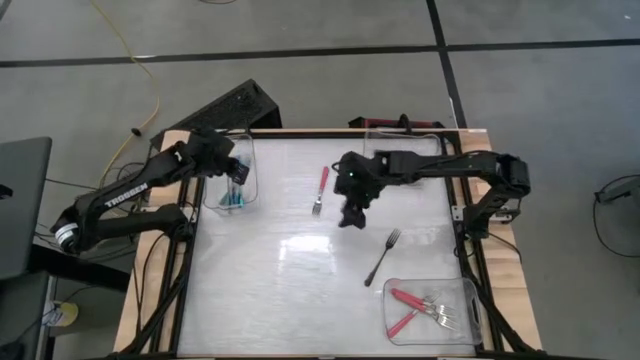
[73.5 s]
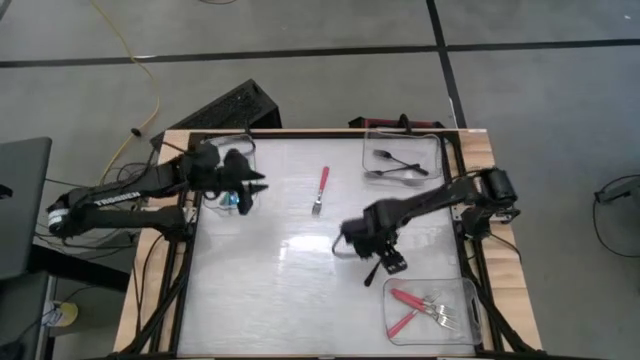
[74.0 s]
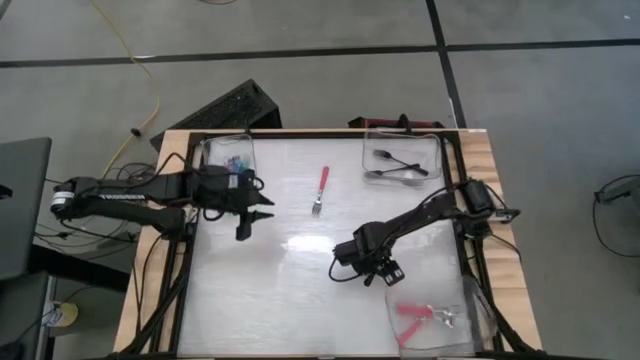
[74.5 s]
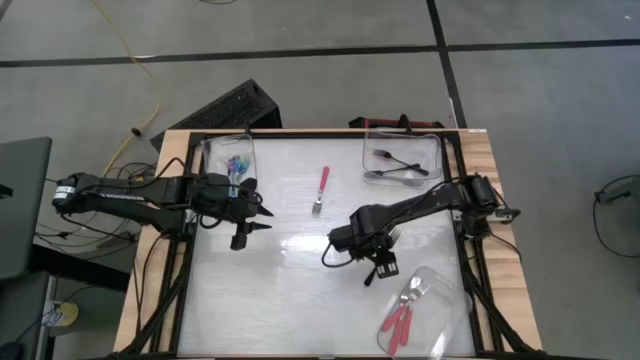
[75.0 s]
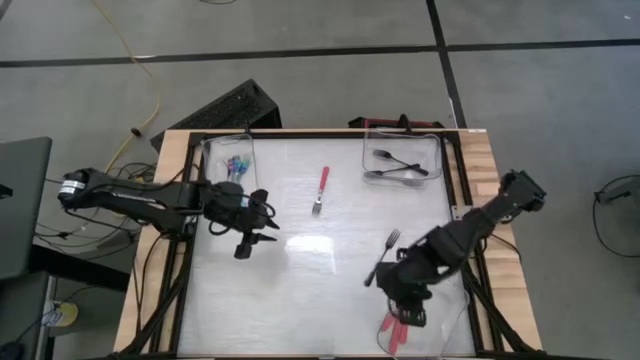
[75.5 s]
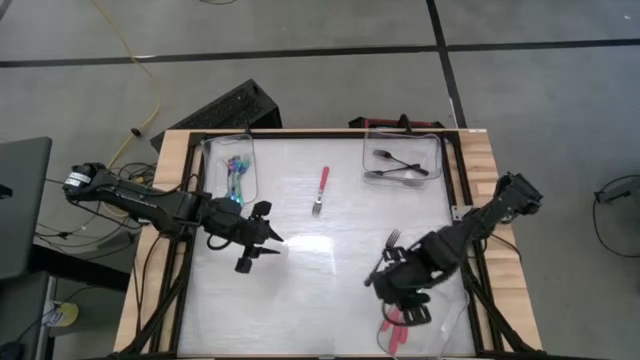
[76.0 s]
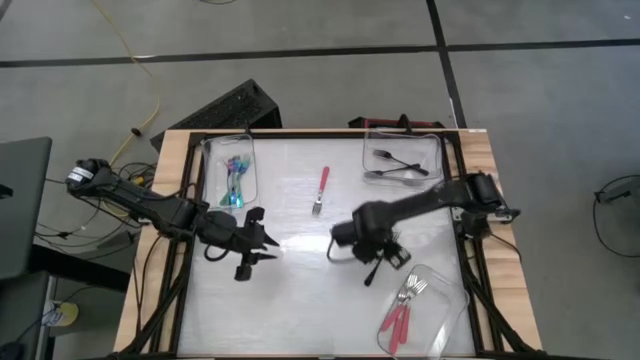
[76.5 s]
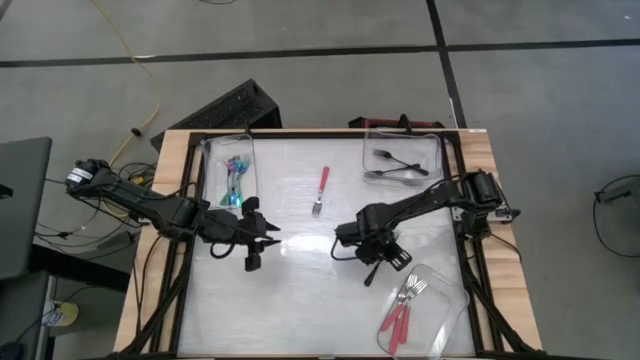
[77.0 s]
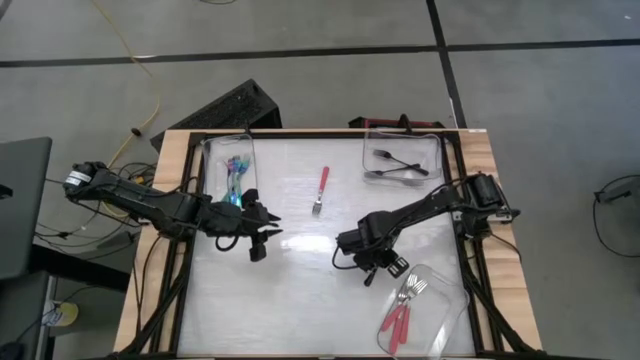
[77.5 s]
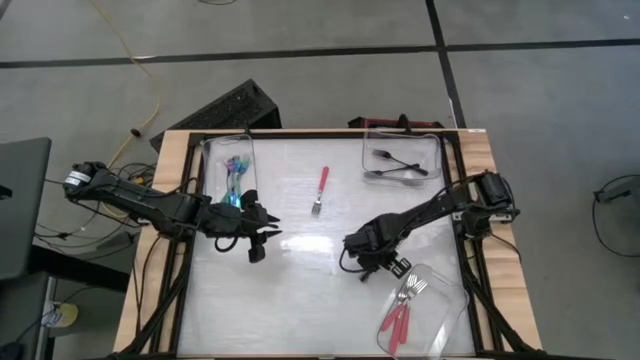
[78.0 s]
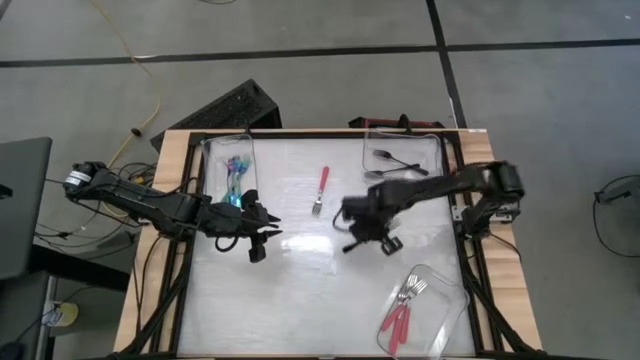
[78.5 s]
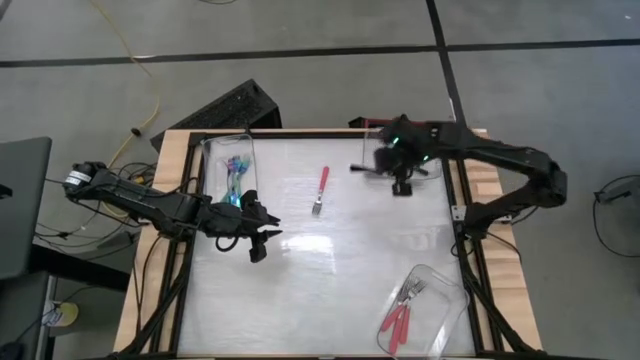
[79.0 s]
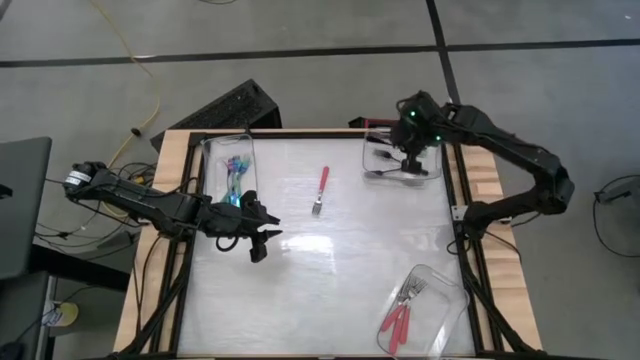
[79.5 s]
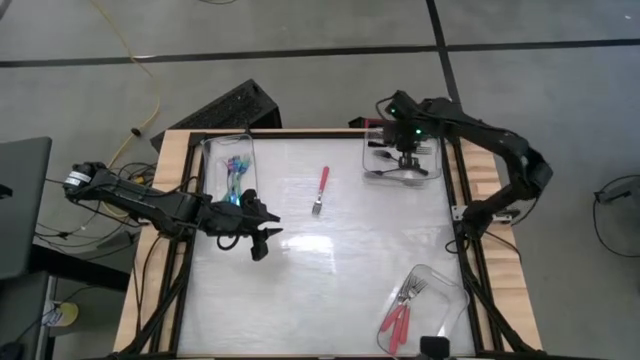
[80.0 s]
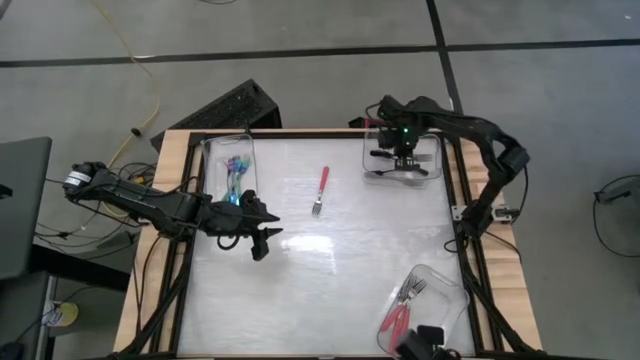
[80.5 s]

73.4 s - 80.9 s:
Task: Sort silverware by color (type)
Put the black fork into the top right transparent bin

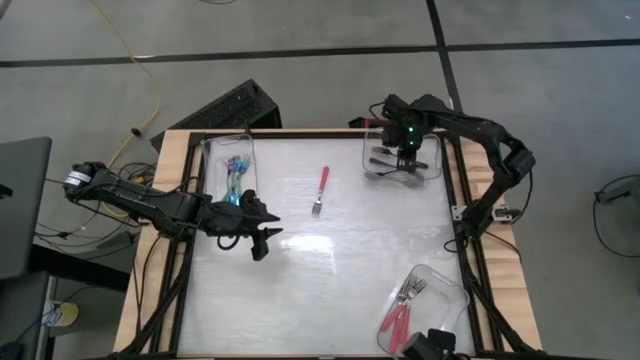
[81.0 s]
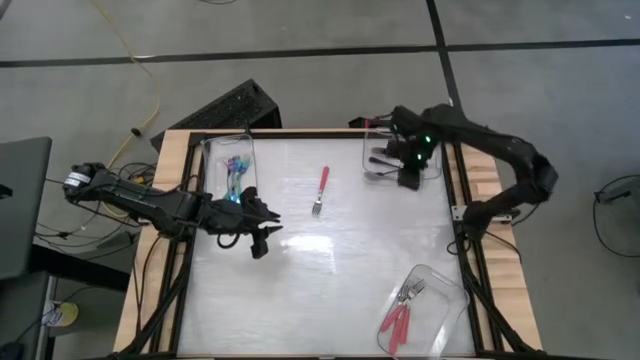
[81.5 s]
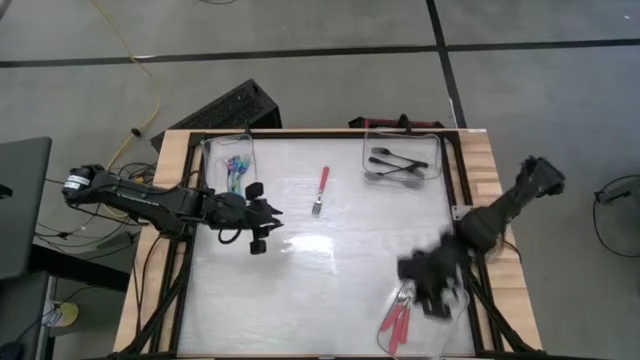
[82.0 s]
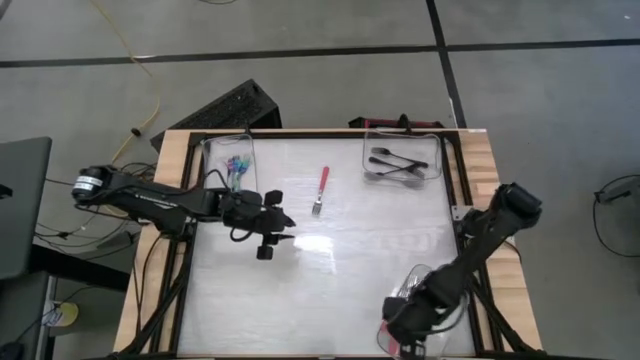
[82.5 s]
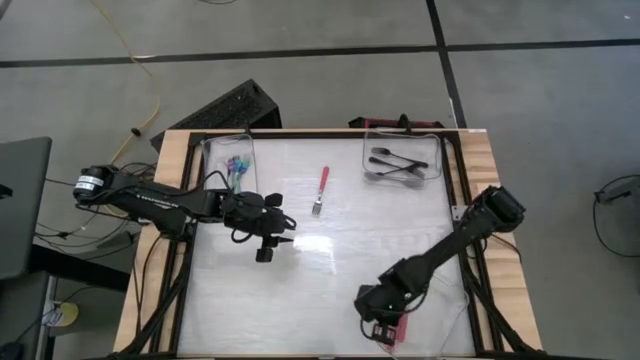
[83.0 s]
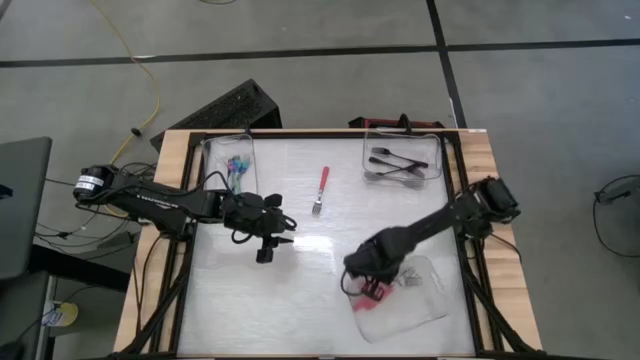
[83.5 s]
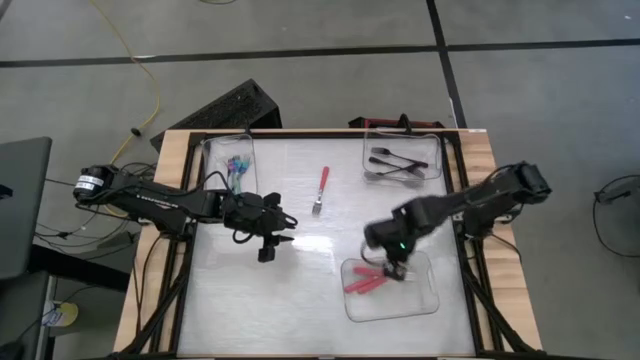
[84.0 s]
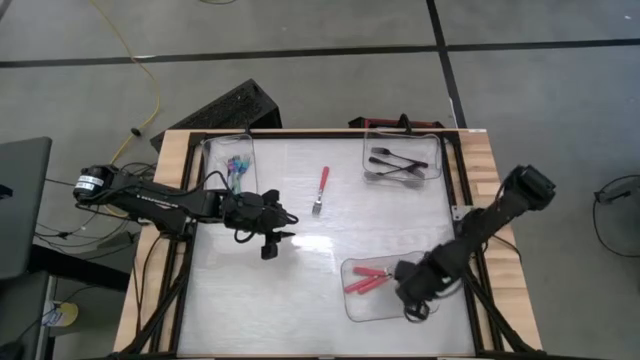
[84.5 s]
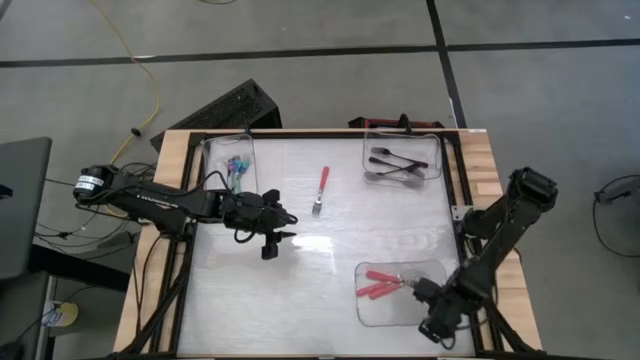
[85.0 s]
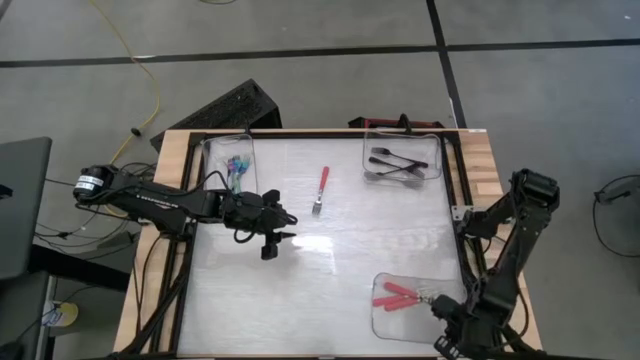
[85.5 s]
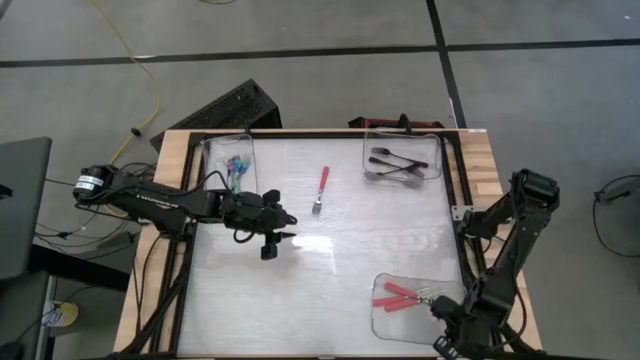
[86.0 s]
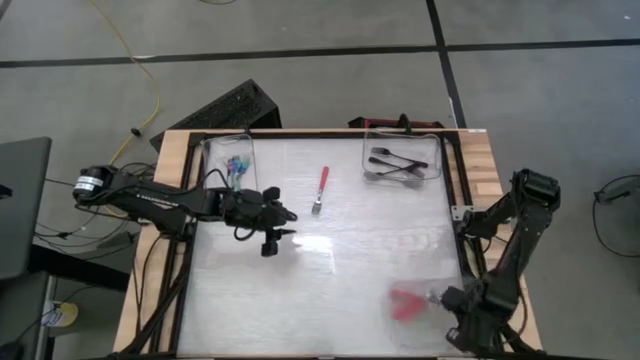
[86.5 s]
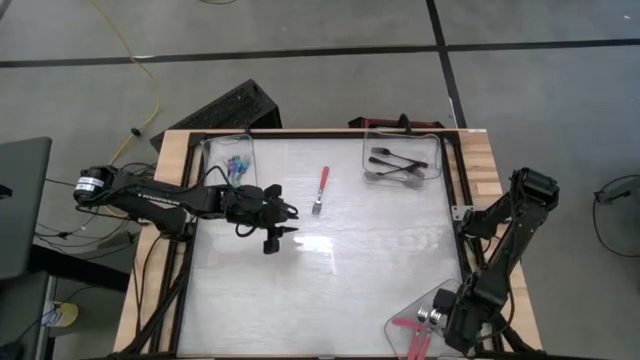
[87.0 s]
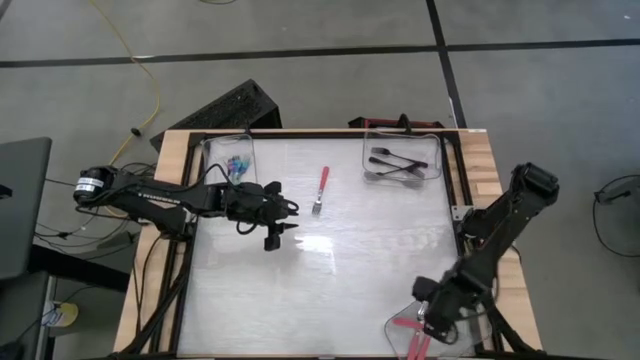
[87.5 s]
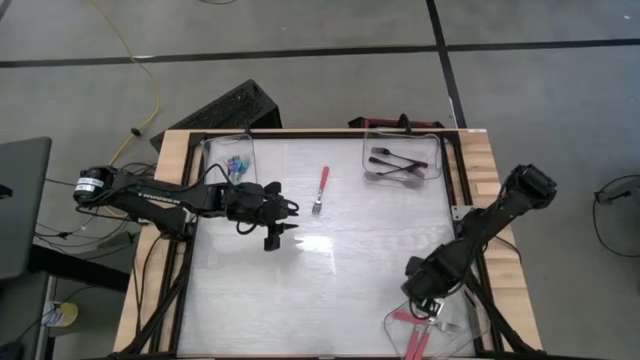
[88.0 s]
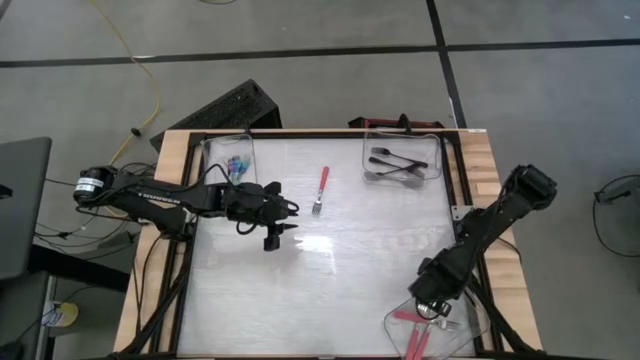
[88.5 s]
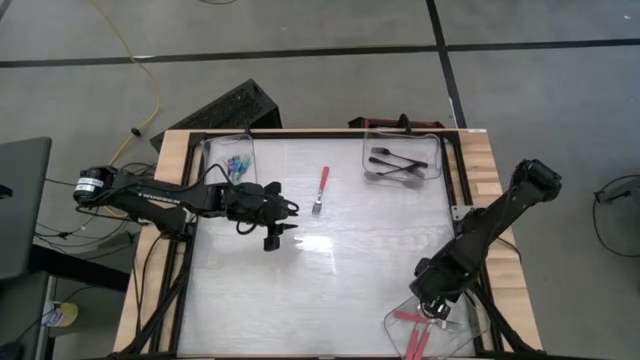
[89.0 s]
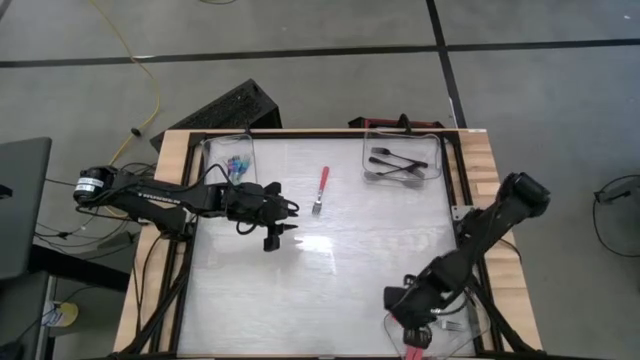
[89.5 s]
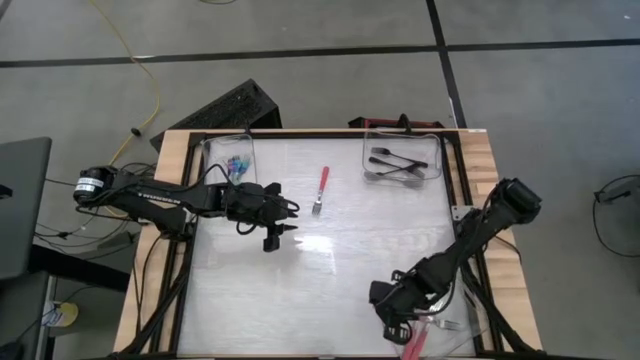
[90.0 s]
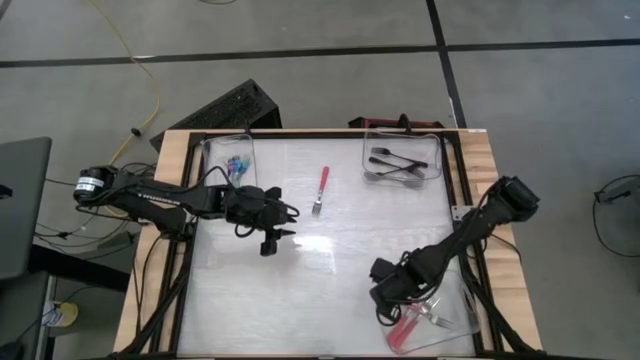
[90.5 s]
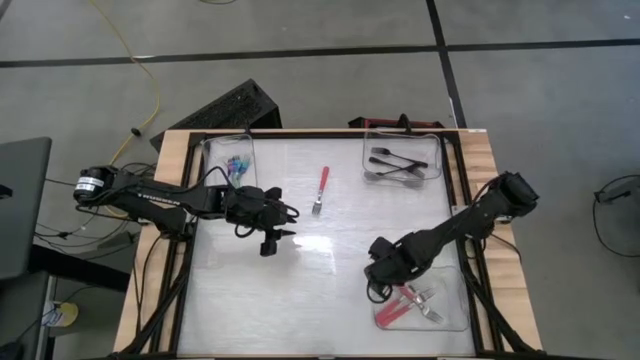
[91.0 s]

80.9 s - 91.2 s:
Adjust the bottom right transparent bin

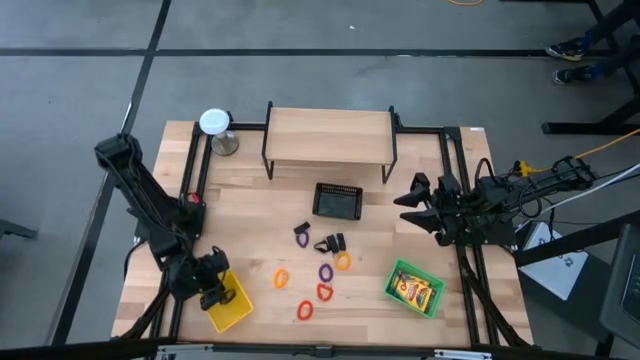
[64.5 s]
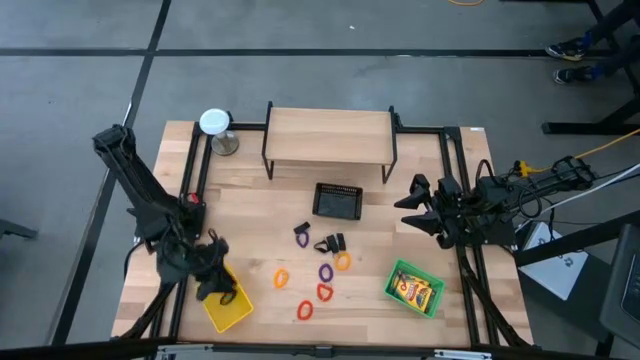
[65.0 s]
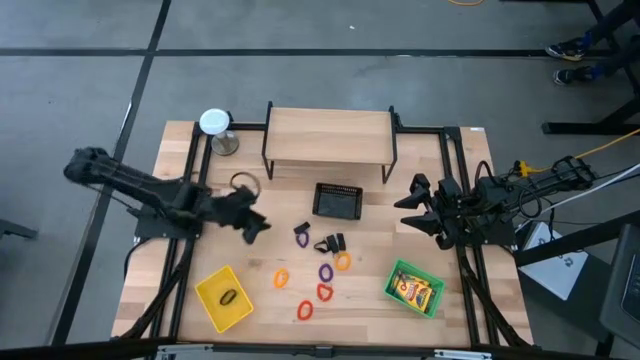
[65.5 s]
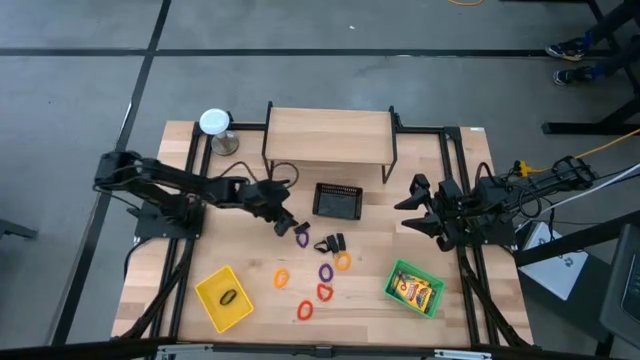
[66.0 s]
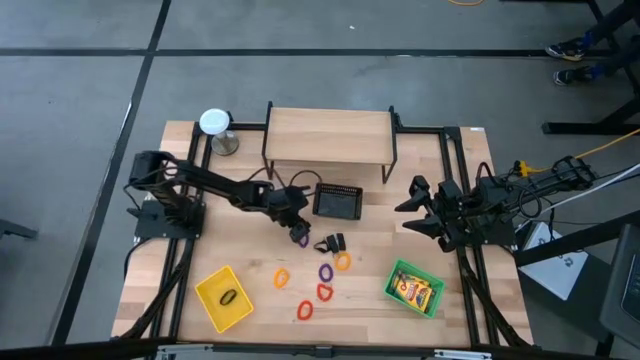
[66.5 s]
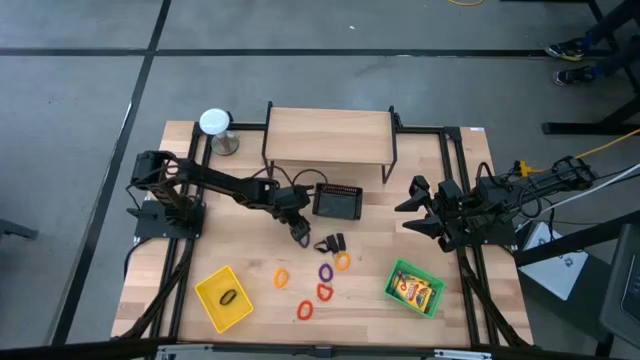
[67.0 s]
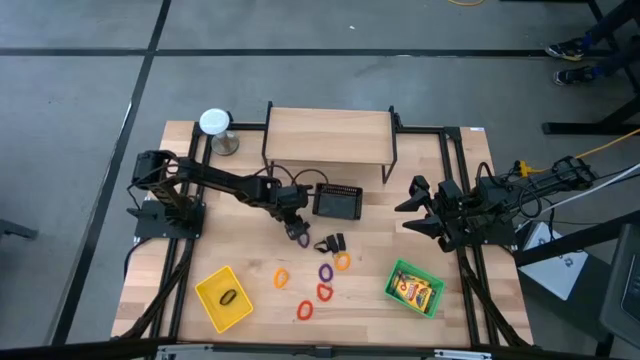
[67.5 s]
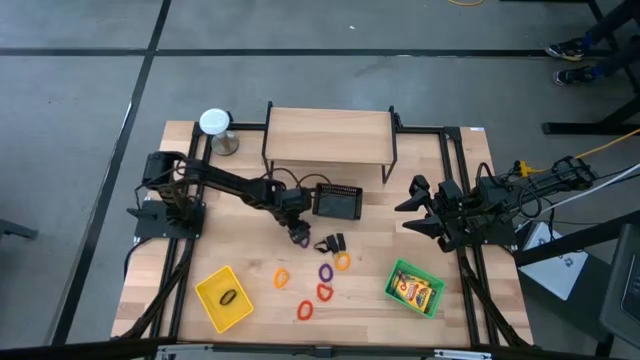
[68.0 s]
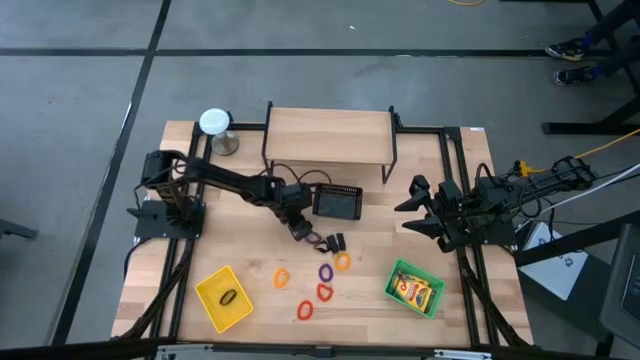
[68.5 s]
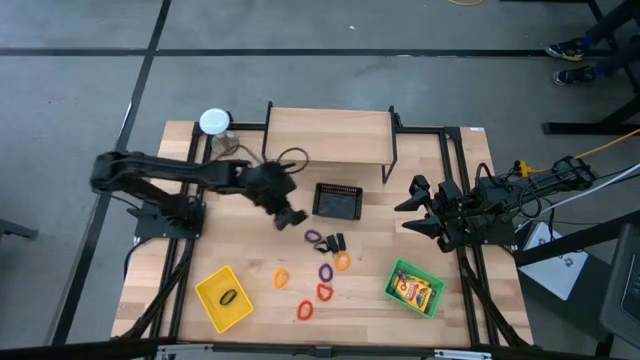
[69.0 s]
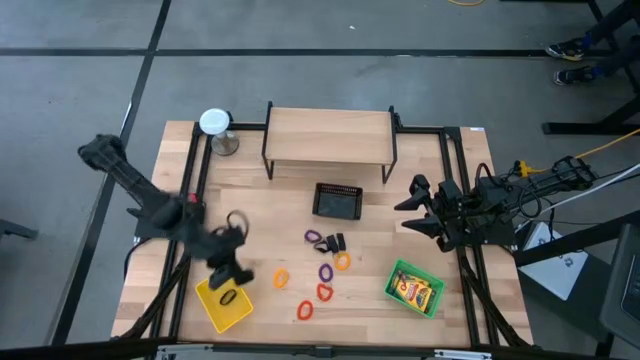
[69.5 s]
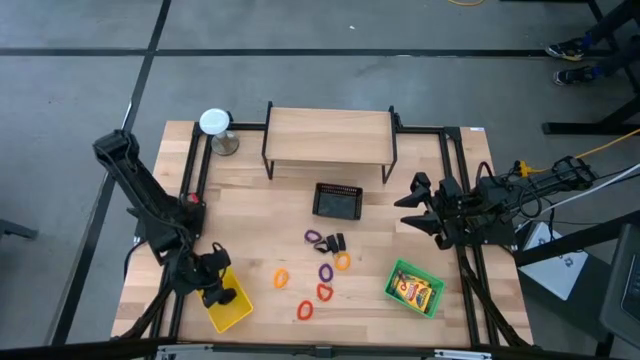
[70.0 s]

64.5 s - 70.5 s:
Task: Pick & Place Office Desk Supplies
Put the black rubber band into the yellow basket
